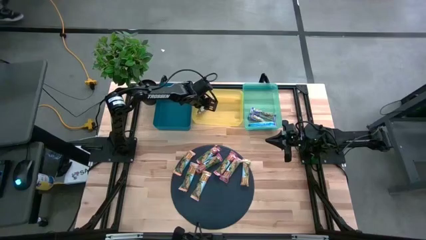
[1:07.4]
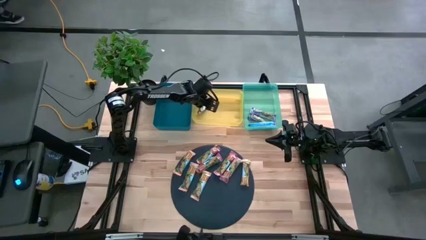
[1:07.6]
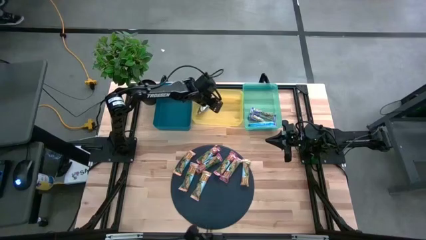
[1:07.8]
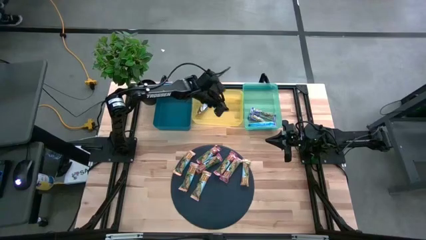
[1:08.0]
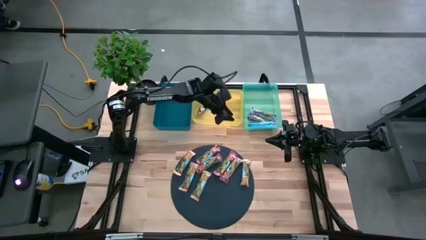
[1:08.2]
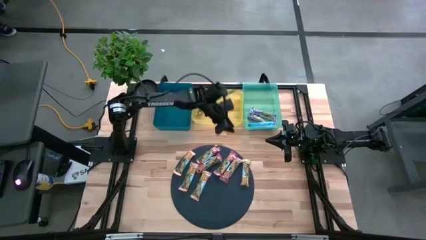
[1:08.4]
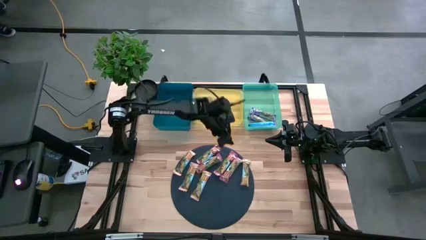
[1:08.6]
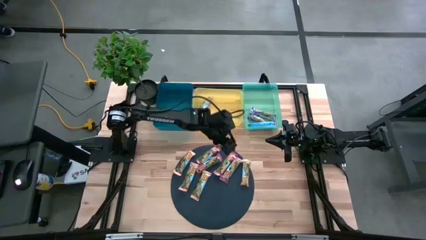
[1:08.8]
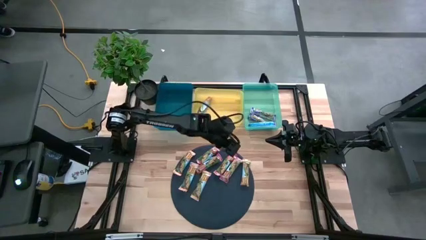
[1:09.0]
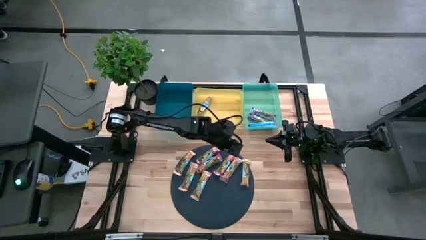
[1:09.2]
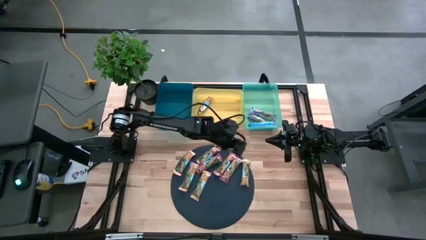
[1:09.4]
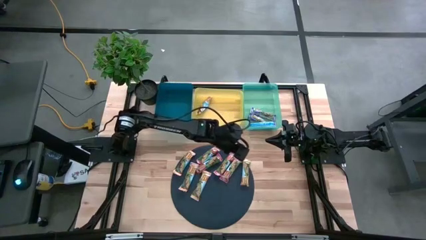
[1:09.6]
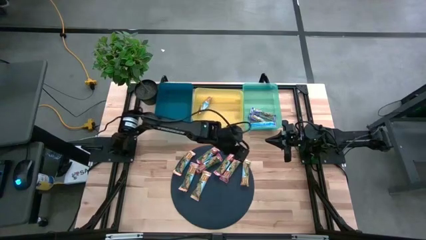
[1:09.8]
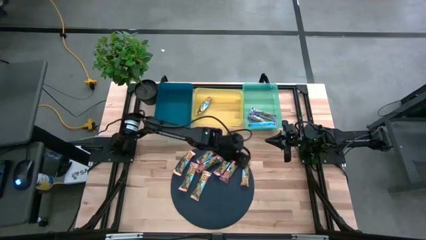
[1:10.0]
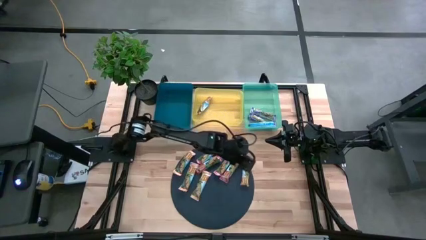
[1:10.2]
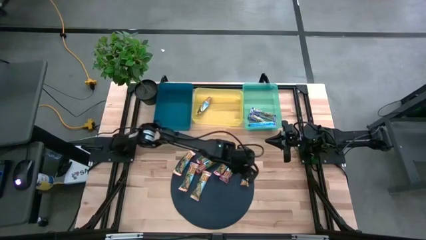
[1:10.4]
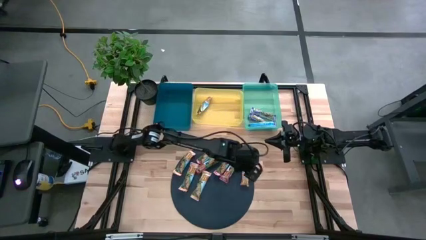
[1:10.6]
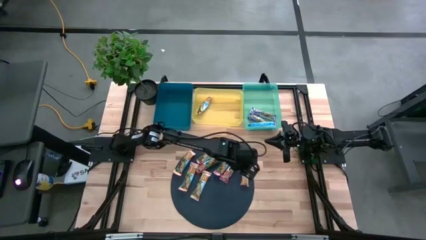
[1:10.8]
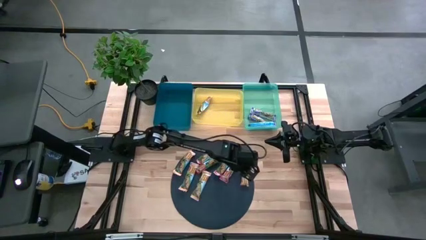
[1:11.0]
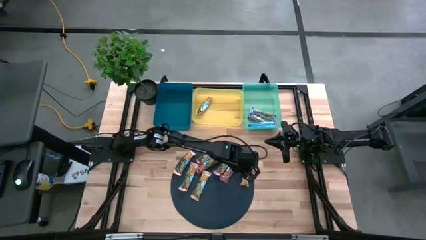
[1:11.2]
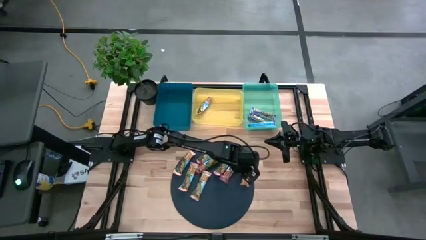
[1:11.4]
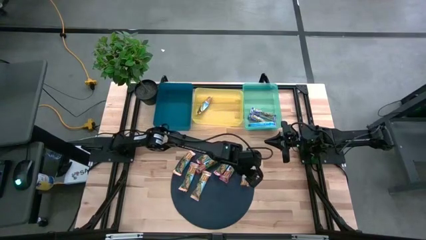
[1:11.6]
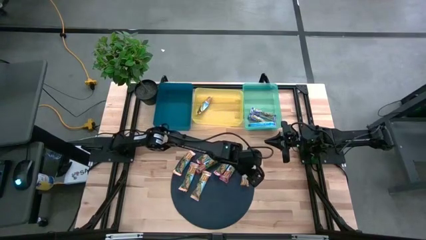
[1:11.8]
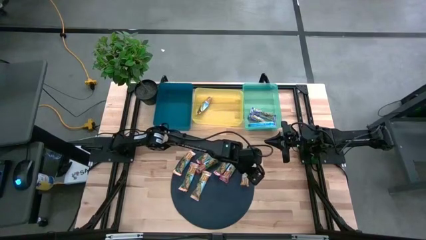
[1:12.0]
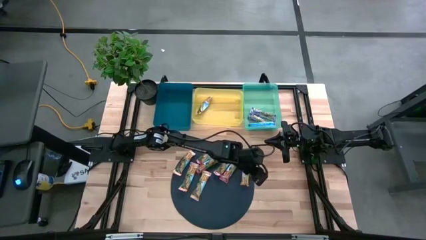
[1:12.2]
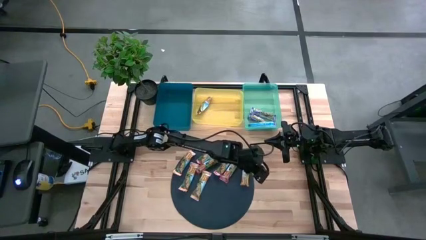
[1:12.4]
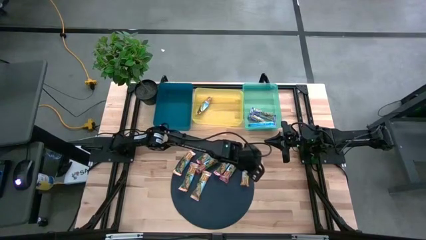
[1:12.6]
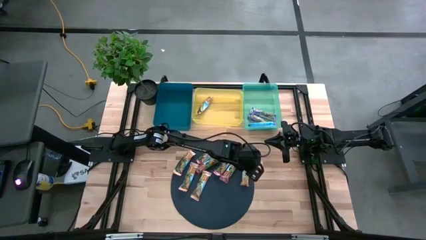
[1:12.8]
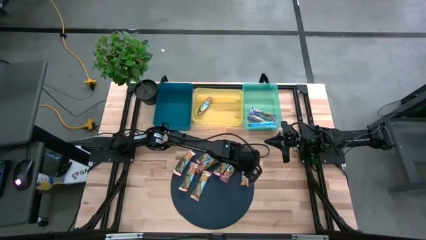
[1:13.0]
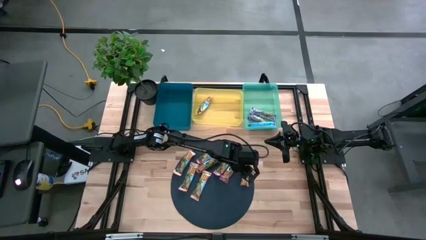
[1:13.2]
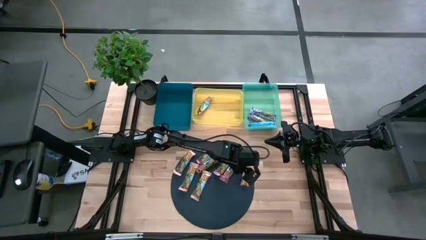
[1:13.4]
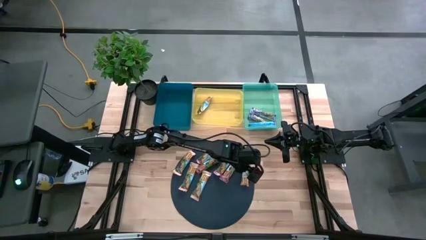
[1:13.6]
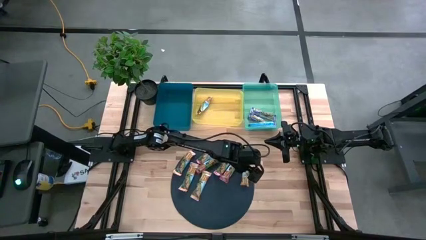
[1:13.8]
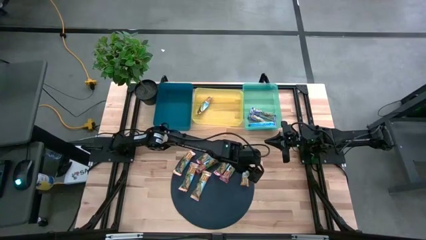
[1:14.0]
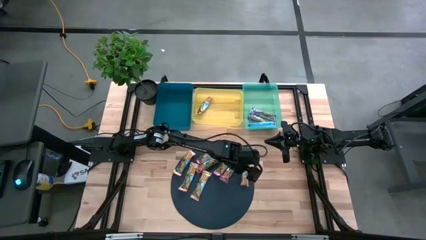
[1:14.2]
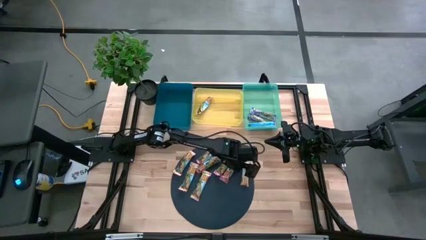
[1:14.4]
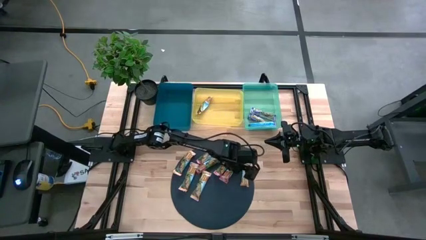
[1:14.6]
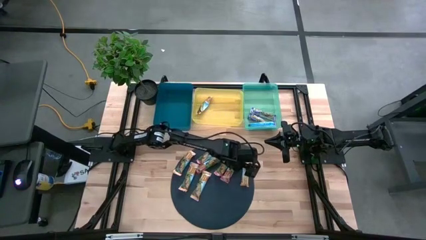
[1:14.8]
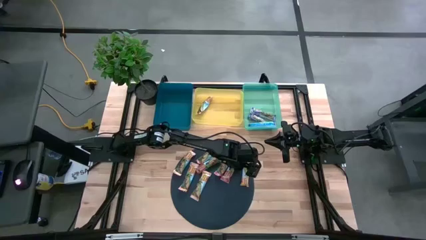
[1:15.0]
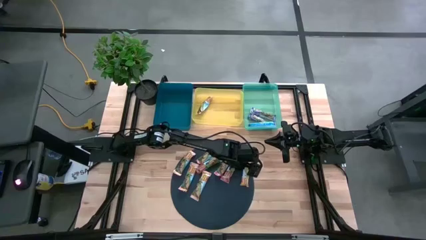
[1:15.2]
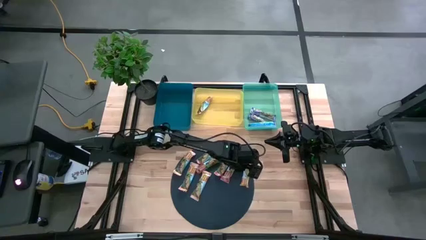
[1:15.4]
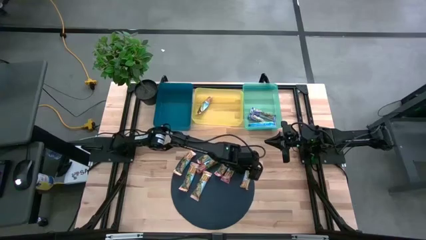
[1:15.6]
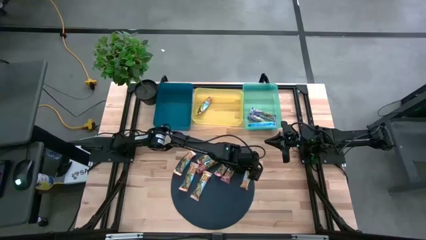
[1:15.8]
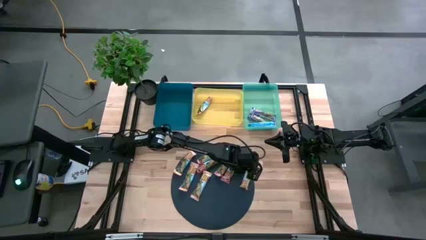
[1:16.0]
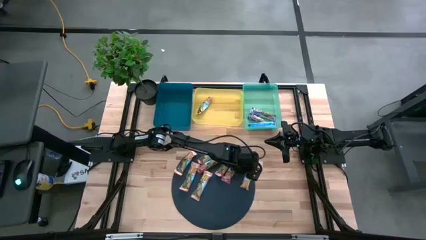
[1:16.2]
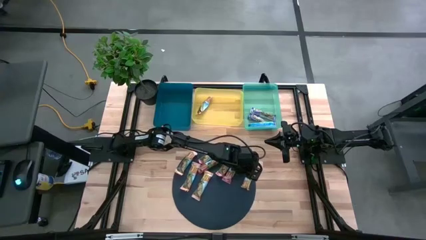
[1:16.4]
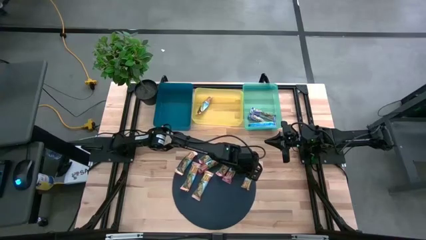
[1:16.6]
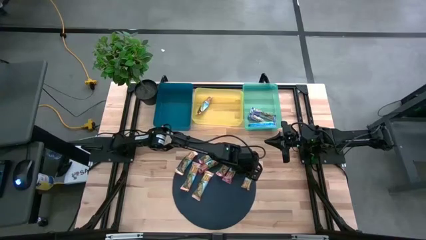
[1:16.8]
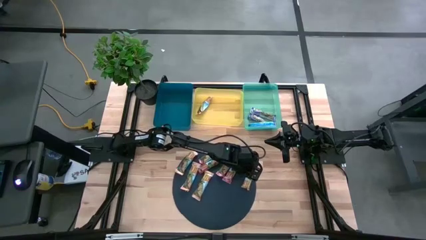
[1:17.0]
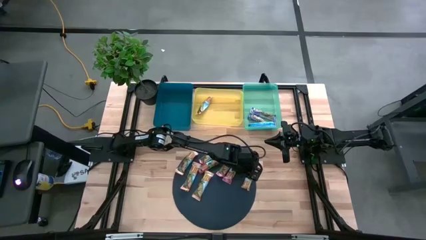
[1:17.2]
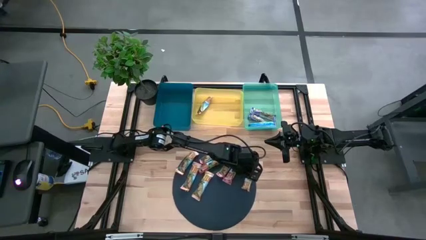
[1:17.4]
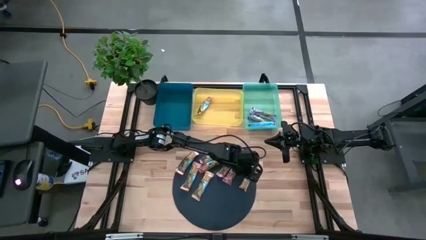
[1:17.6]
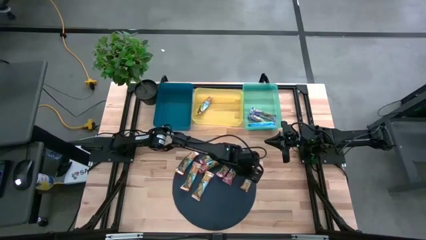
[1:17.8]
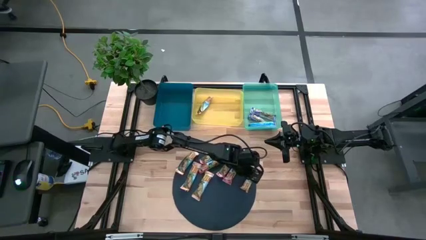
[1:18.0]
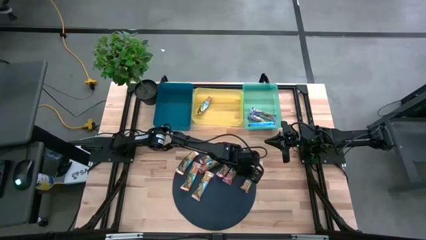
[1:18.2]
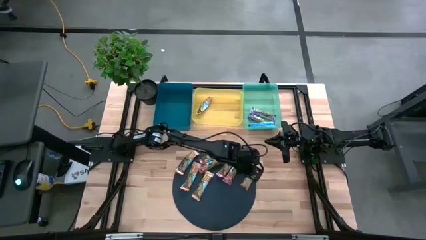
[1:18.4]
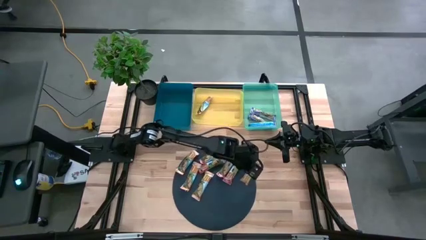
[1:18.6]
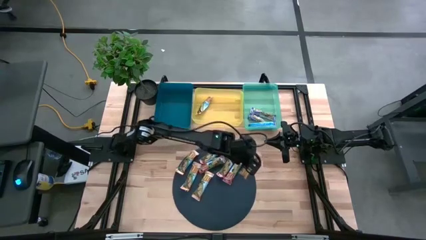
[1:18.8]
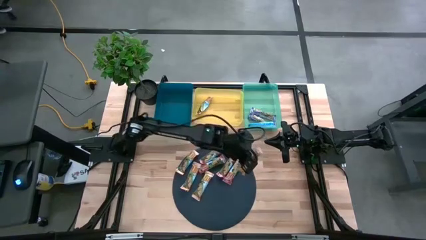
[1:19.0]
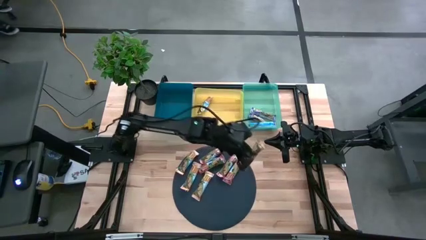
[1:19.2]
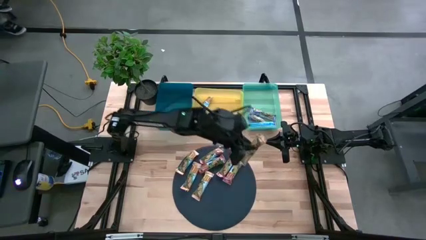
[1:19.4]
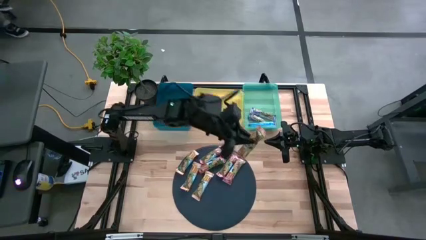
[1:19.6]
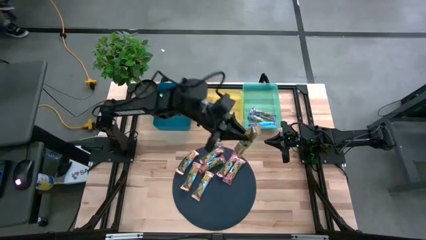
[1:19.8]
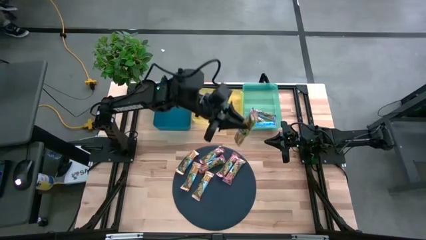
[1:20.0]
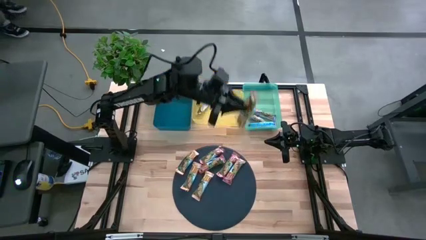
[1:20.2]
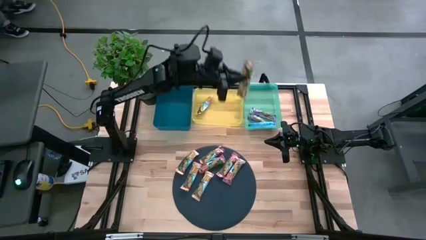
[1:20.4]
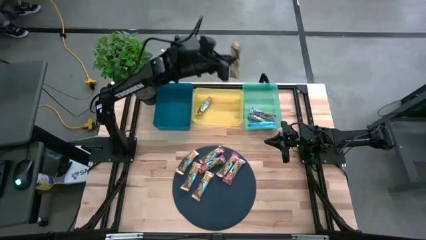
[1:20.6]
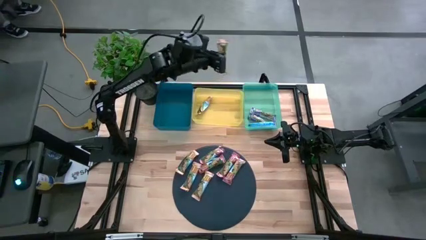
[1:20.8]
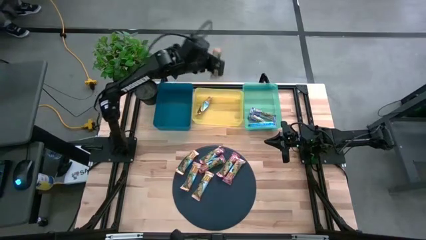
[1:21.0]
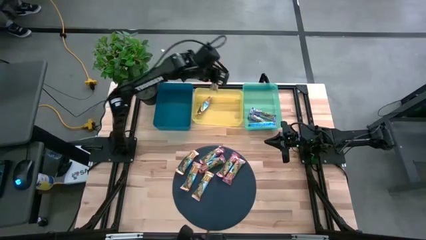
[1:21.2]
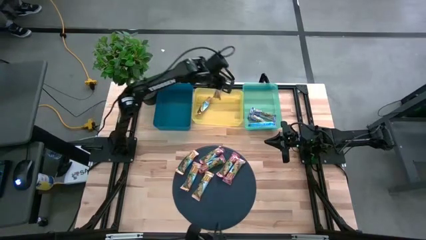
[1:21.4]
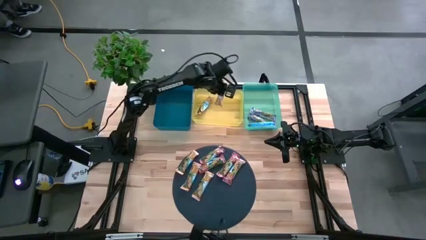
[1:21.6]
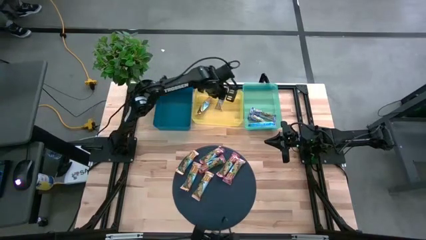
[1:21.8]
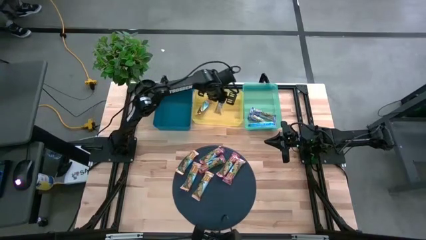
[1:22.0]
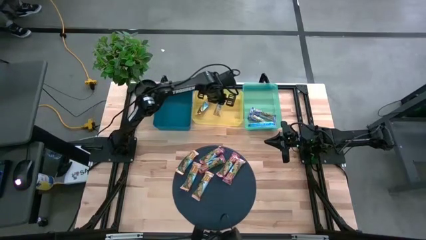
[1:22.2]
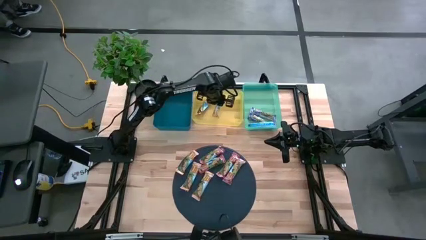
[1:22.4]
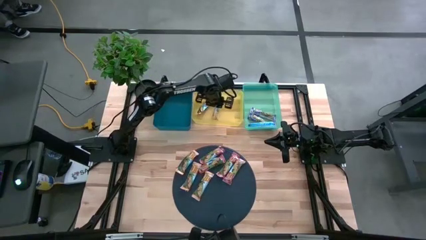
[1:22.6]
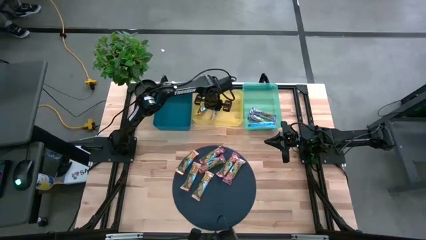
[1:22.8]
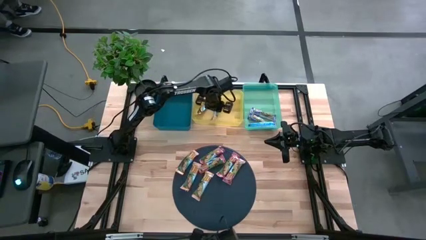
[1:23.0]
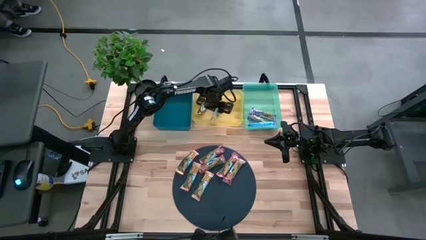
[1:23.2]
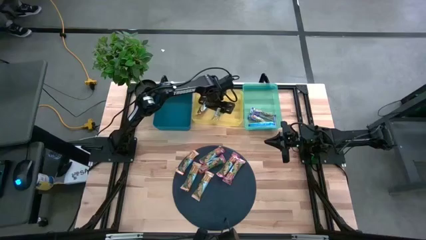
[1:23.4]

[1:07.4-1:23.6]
Task: Pick and place Granola Bars by type
Put the yellow granola bar into the yellow bin
